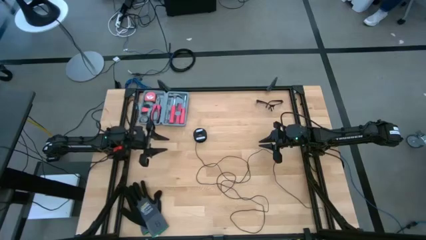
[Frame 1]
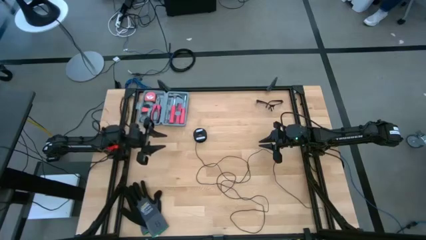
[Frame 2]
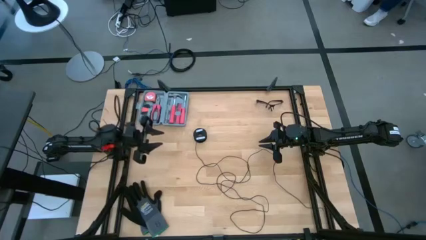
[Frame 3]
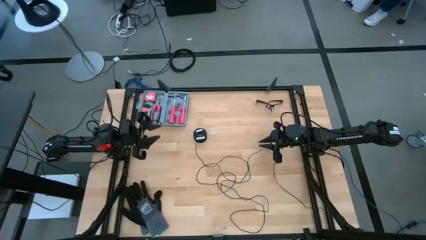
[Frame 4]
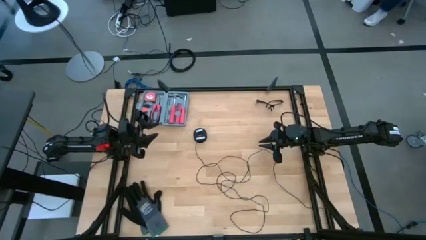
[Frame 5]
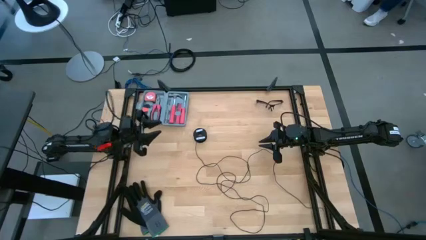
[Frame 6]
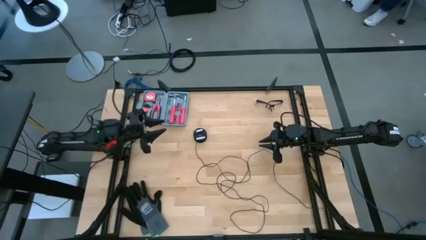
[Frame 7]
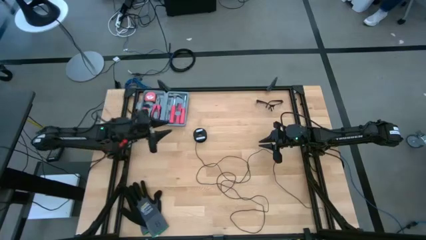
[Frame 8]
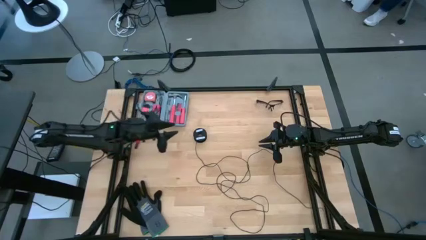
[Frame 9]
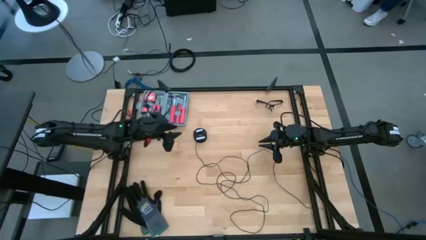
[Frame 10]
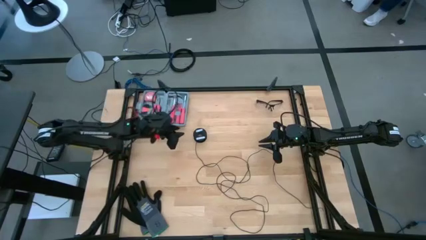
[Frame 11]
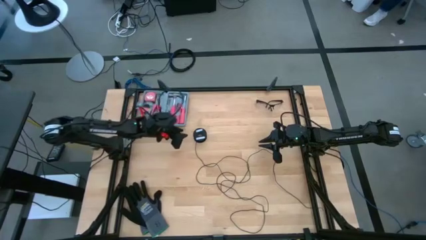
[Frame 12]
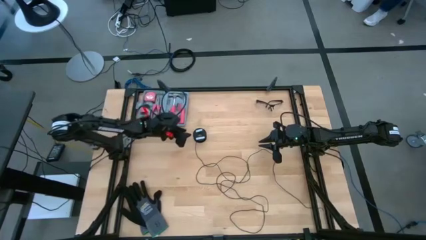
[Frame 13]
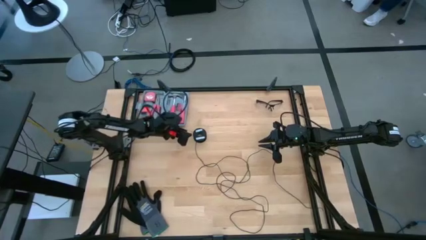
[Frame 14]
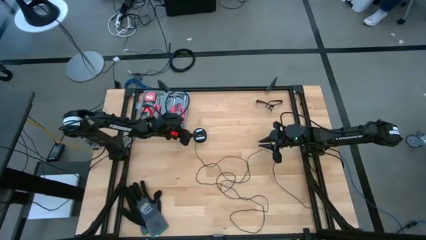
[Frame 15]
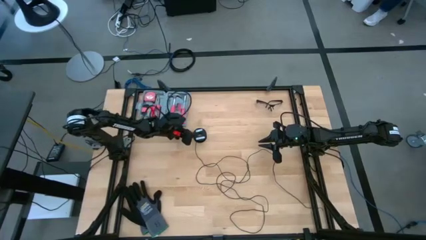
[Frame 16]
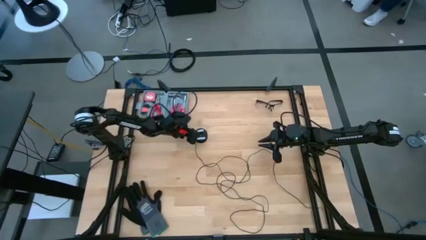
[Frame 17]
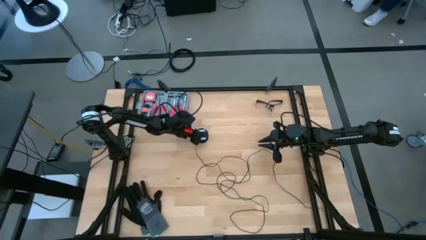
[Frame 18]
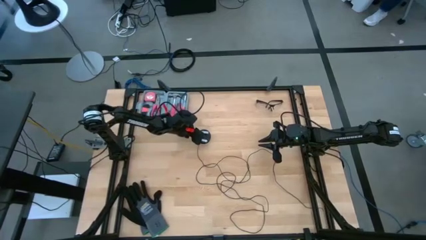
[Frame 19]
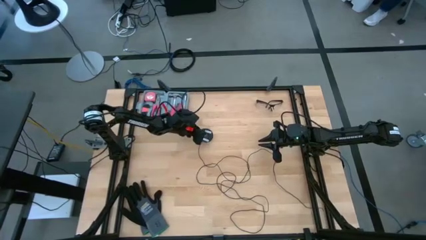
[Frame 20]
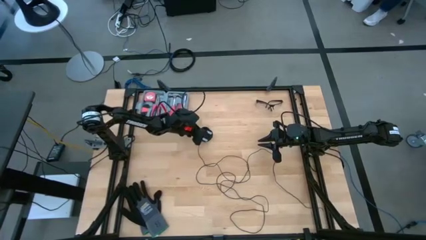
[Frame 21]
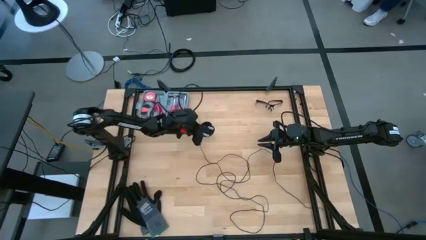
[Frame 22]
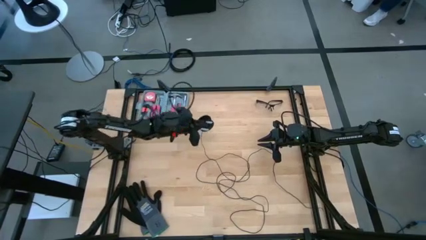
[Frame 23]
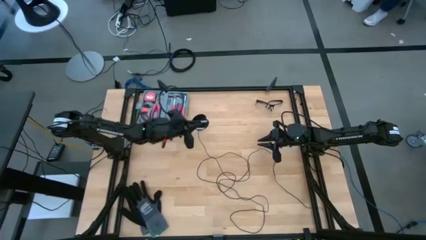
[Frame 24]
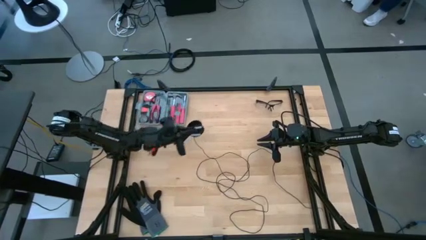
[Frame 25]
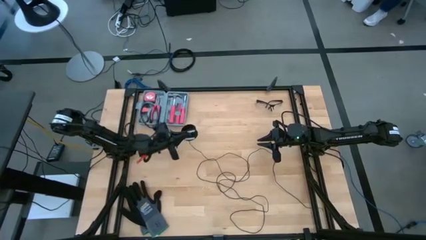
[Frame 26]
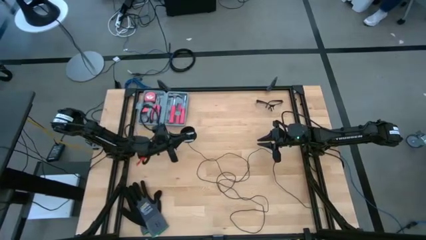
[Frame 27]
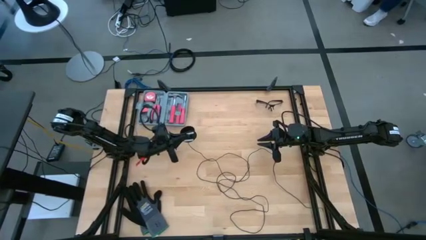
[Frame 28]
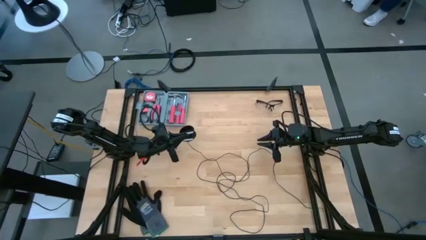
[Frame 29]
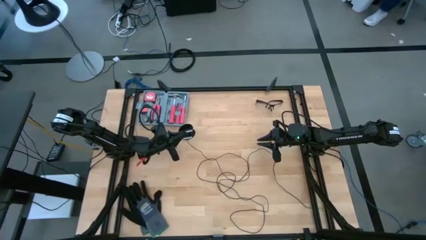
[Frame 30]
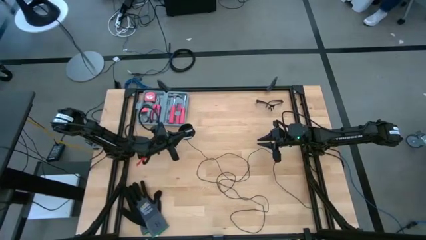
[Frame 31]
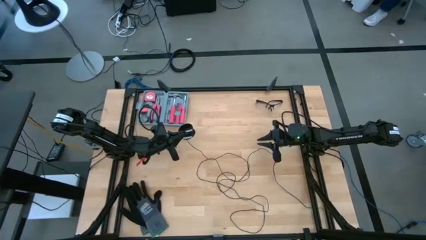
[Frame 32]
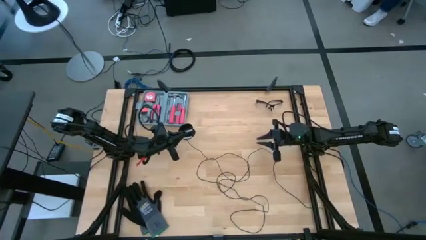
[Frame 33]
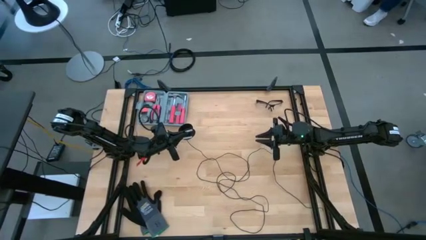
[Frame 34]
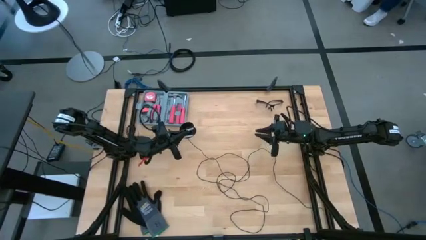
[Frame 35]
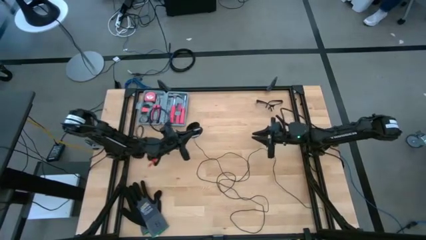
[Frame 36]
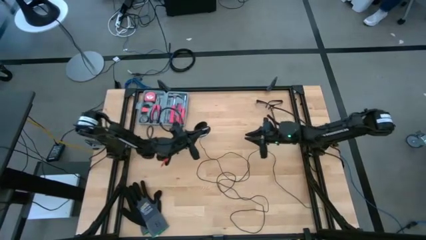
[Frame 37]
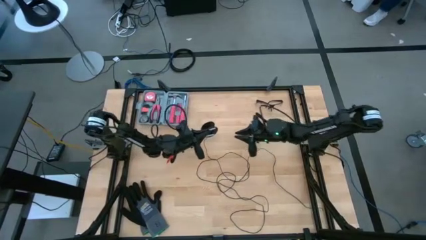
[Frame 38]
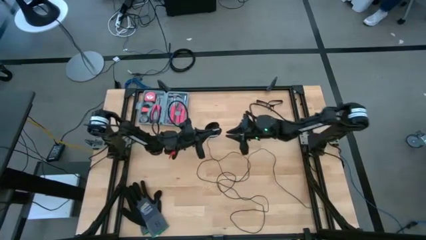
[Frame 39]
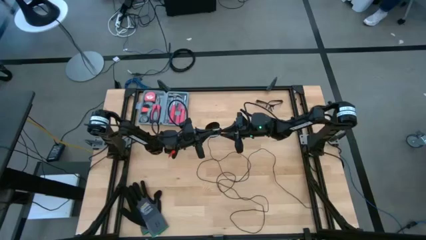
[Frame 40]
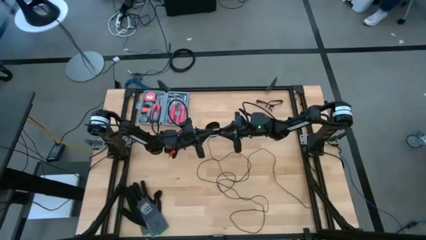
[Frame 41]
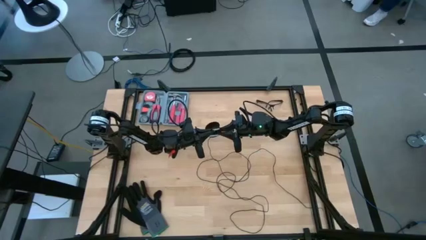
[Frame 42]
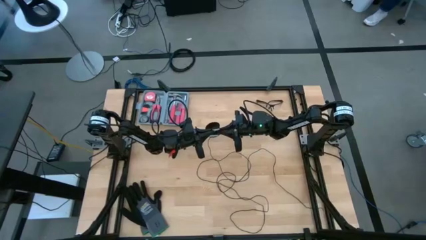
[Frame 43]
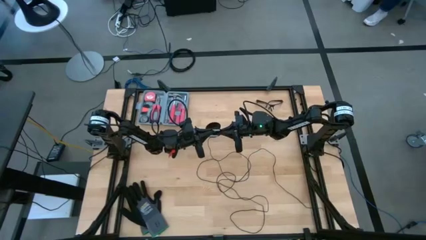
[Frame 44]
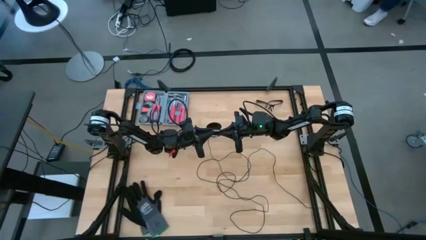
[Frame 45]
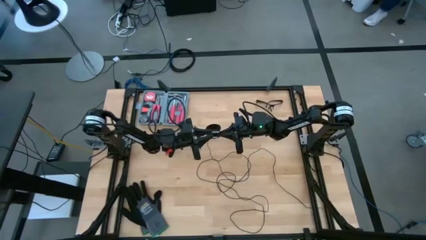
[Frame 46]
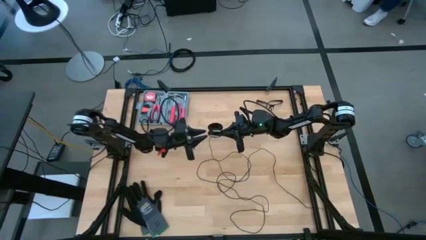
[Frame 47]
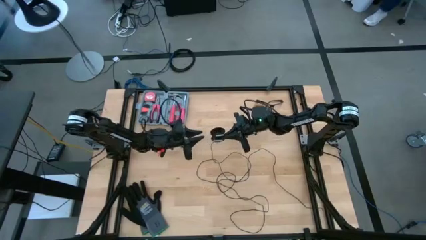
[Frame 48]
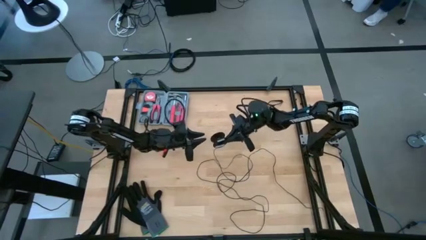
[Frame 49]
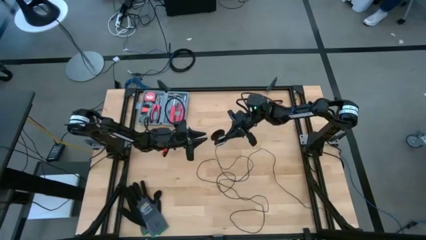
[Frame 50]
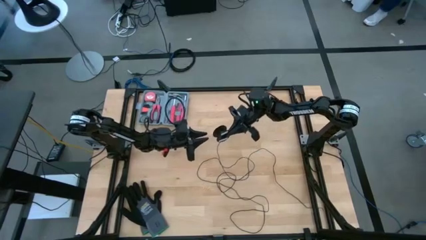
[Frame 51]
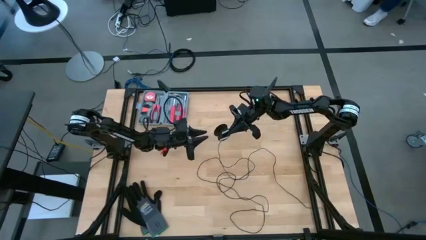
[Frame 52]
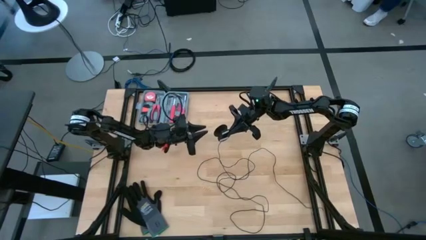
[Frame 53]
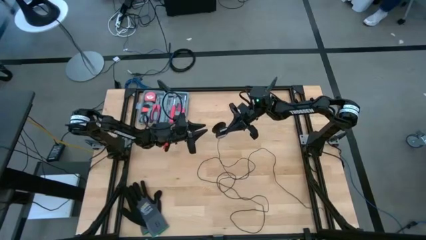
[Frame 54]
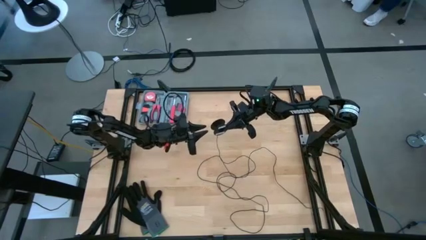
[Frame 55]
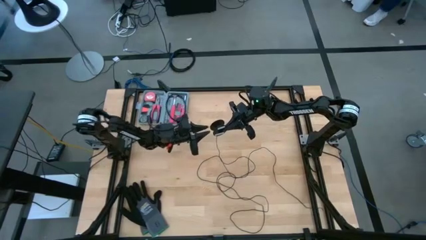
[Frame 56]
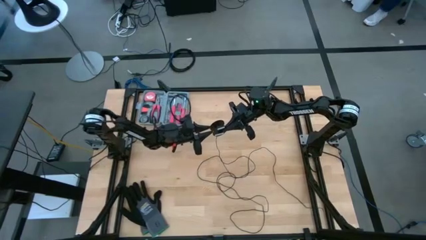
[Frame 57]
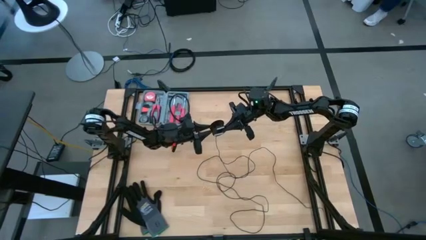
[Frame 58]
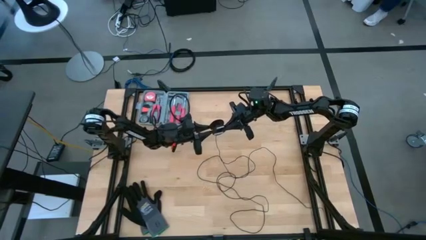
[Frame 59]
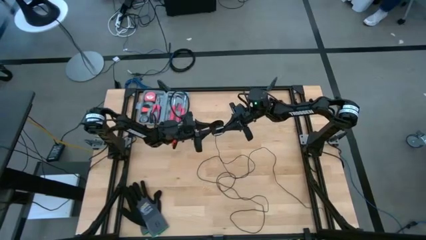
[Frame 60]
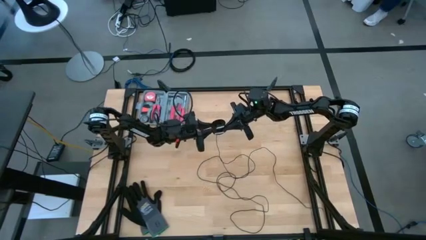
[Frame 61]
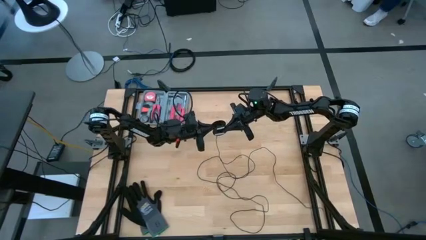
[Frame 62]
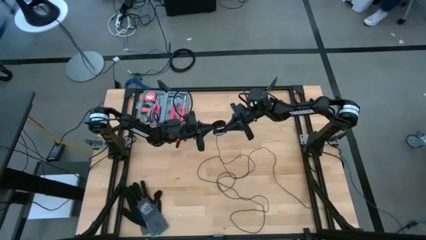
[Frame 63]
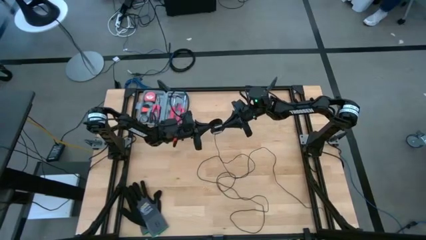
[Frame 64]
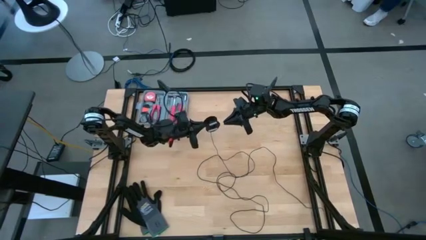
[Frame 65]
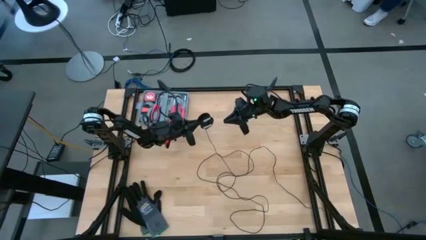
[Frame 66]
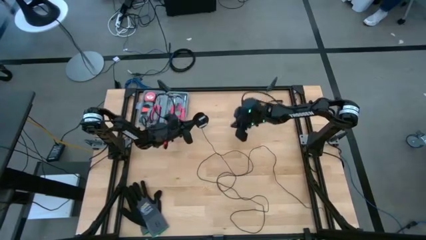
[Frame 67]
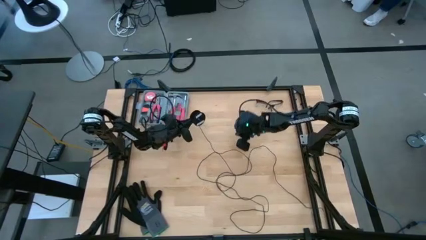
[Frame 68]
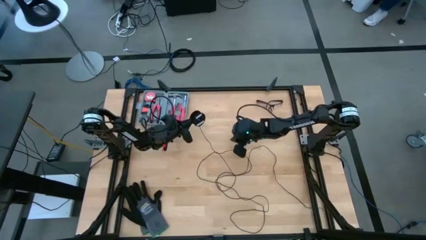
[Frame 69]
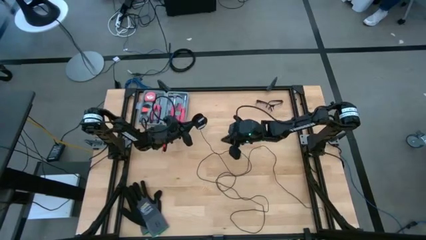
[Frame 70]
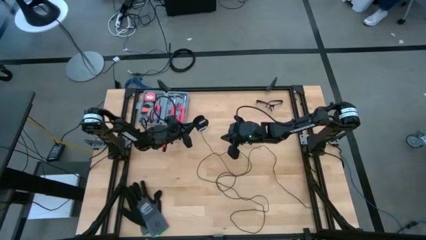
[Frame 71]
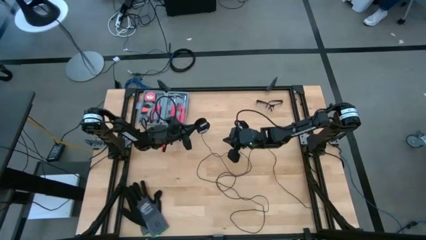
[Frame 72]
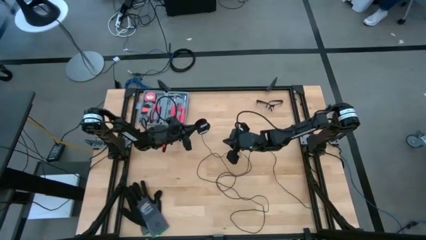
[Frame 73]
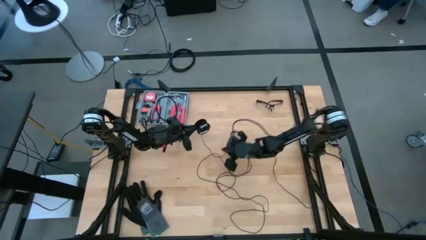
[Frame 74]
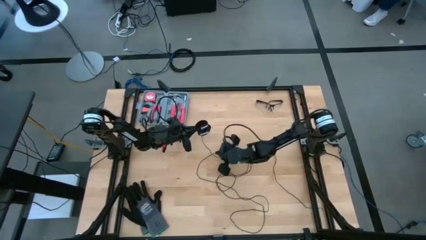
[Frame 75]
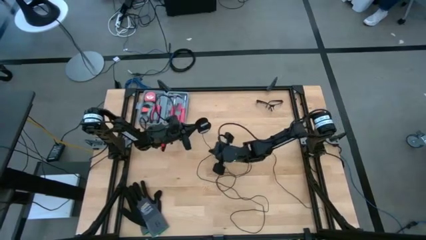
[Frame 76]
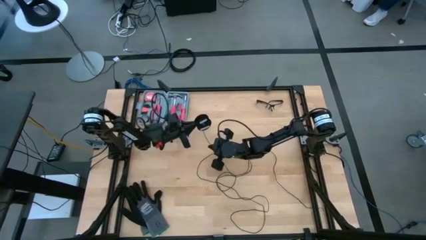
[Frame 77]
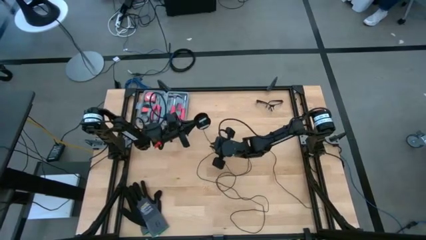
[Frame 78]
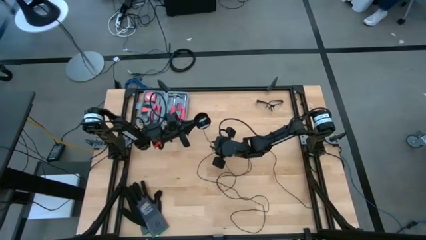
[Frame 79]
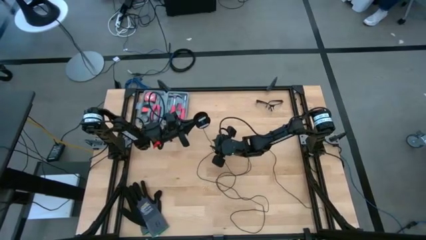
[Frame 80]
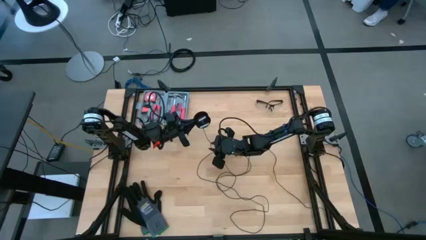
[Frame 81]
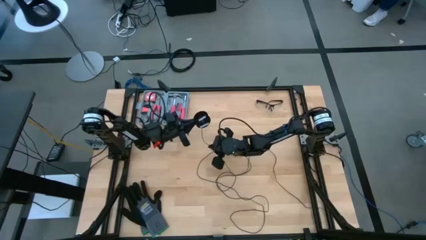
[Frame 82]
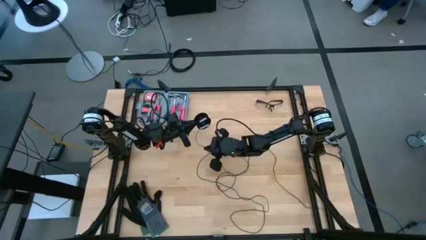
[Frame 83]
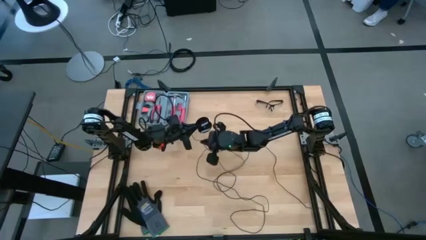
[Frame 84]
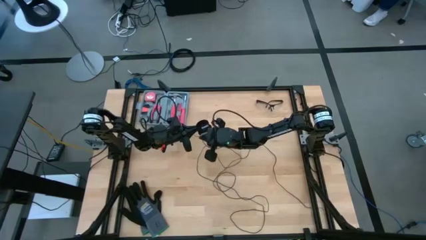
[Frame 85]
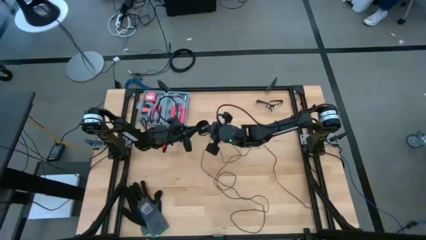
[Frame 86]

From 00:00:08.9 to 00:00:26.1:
Task: Coil cords
Coil the black wire on the black spool
